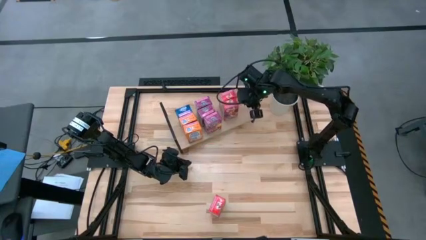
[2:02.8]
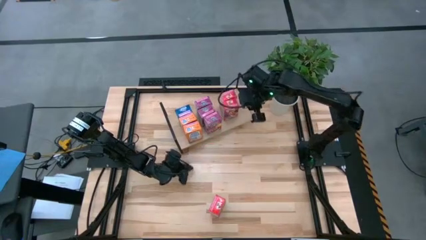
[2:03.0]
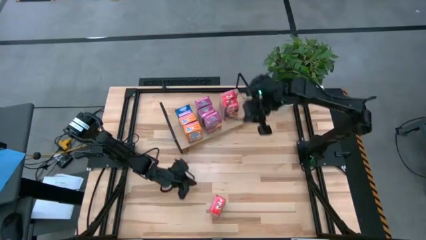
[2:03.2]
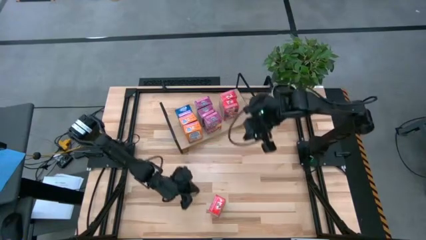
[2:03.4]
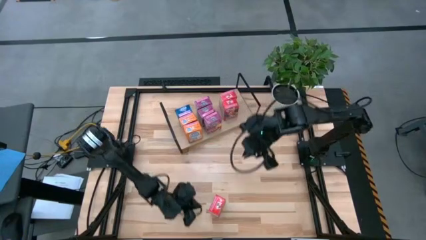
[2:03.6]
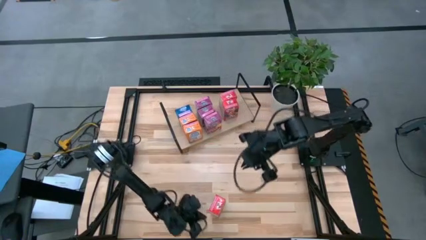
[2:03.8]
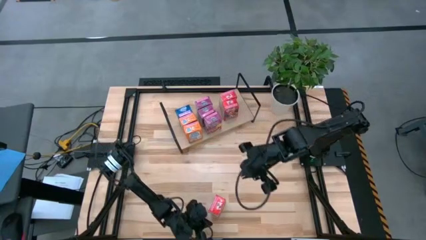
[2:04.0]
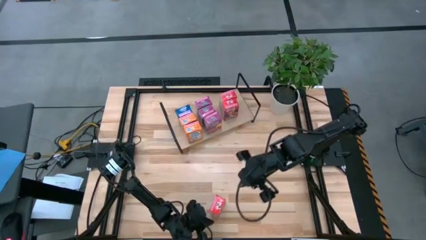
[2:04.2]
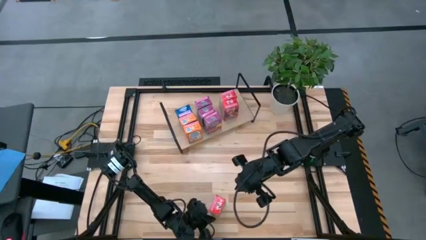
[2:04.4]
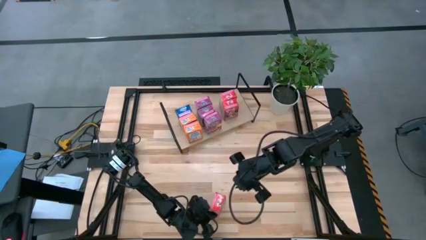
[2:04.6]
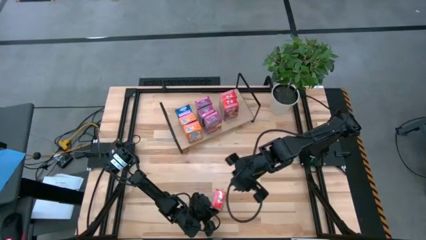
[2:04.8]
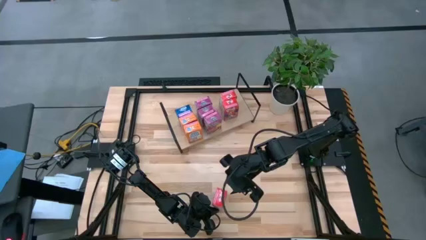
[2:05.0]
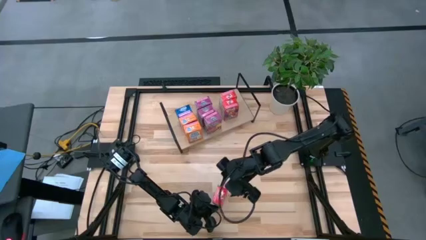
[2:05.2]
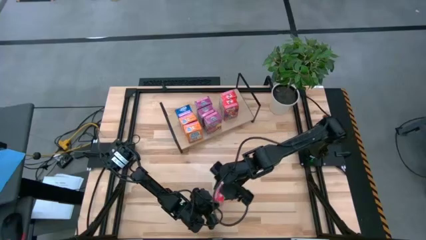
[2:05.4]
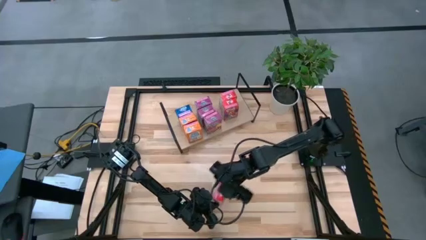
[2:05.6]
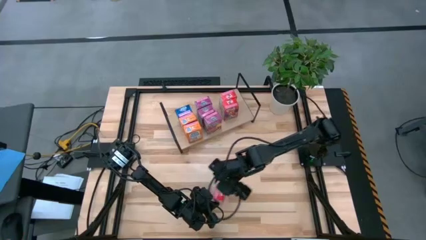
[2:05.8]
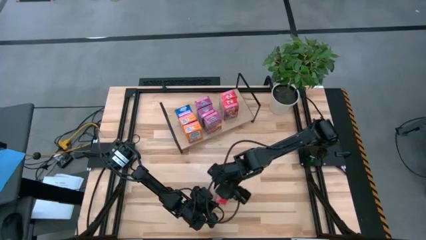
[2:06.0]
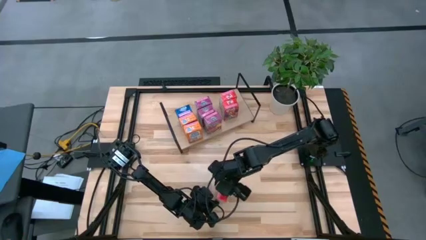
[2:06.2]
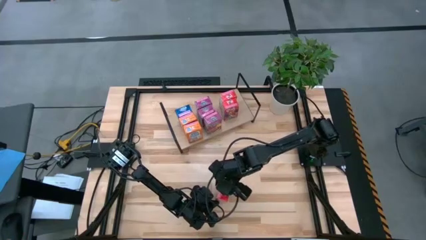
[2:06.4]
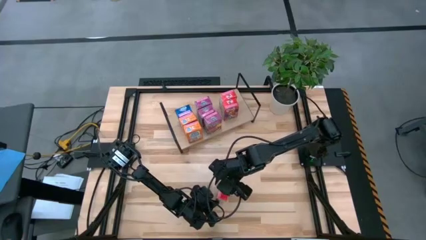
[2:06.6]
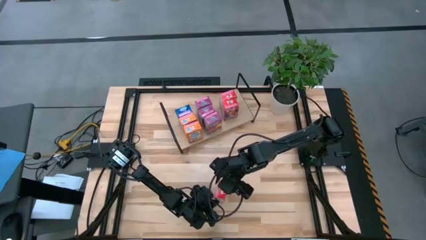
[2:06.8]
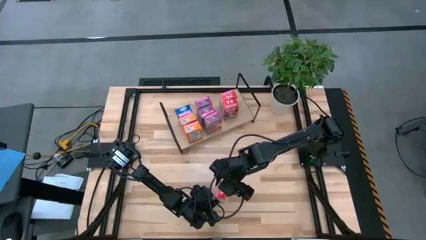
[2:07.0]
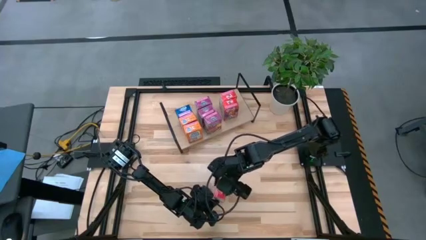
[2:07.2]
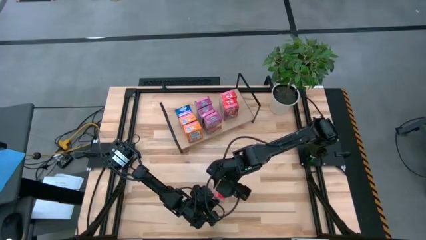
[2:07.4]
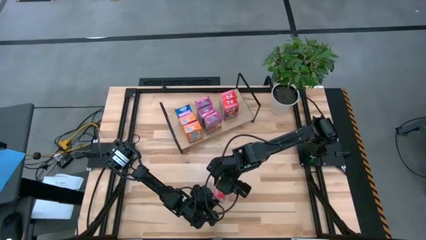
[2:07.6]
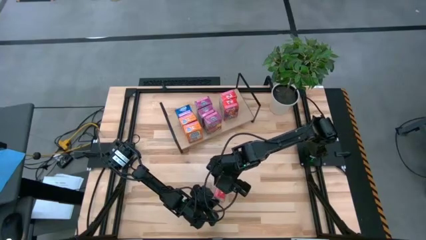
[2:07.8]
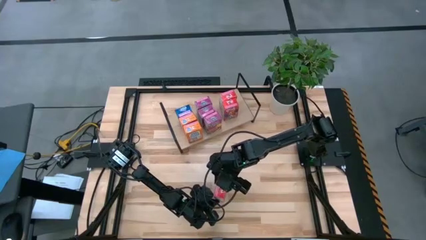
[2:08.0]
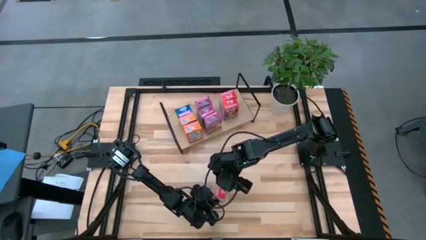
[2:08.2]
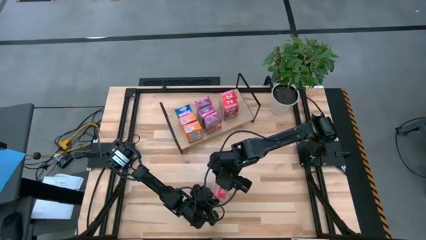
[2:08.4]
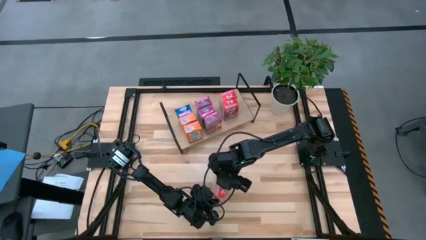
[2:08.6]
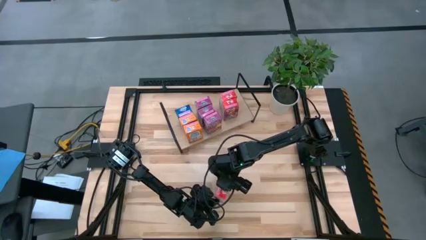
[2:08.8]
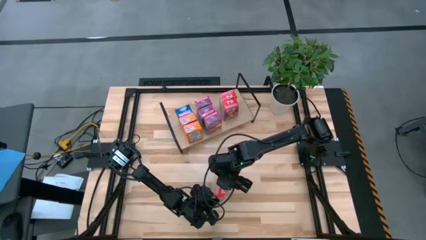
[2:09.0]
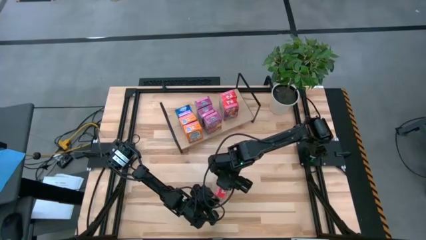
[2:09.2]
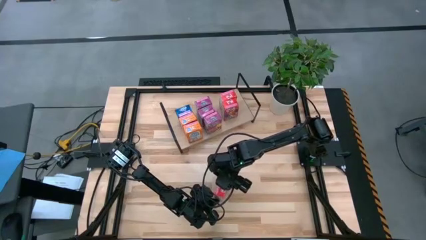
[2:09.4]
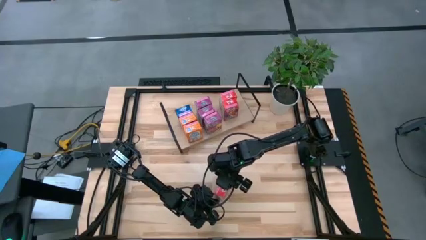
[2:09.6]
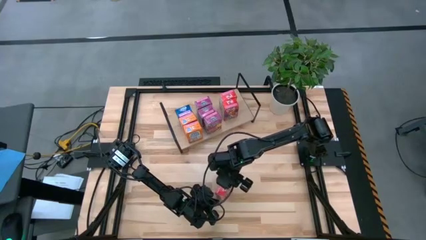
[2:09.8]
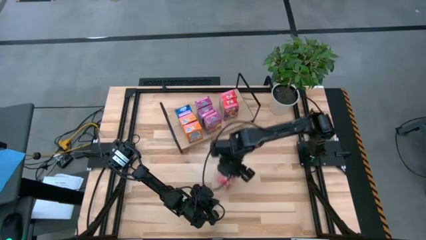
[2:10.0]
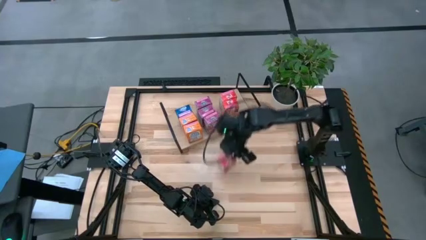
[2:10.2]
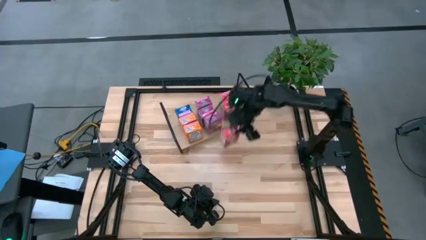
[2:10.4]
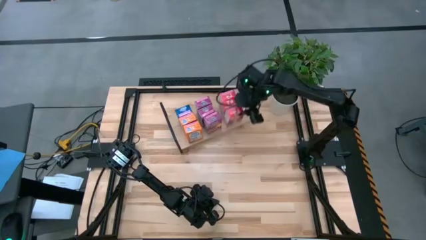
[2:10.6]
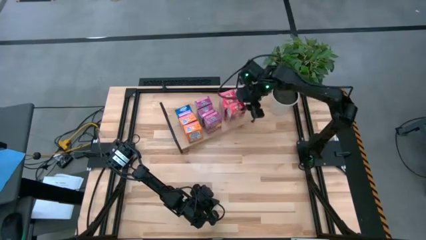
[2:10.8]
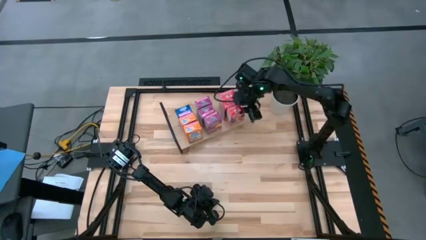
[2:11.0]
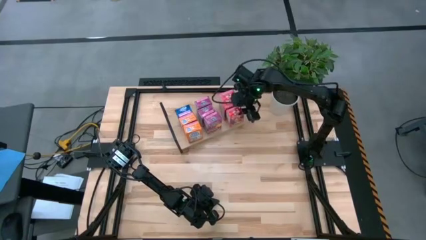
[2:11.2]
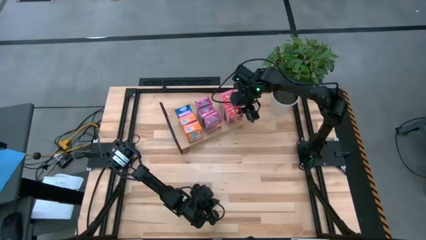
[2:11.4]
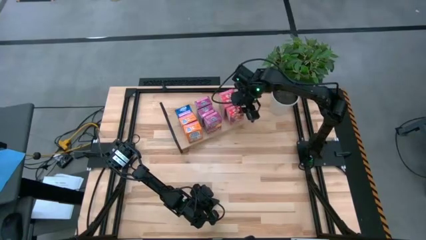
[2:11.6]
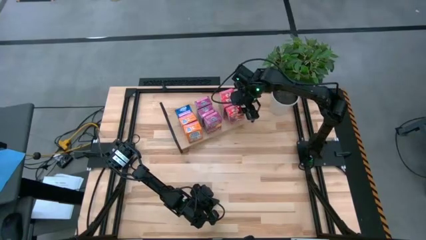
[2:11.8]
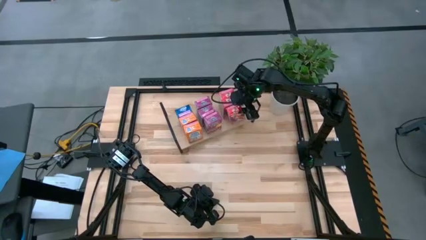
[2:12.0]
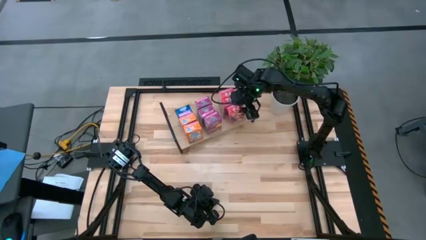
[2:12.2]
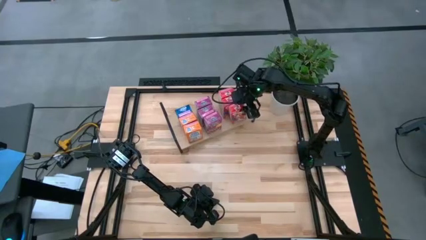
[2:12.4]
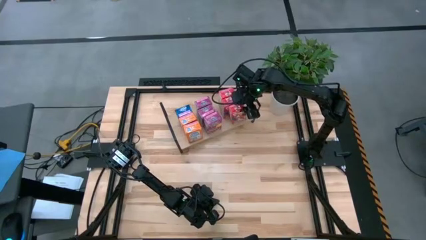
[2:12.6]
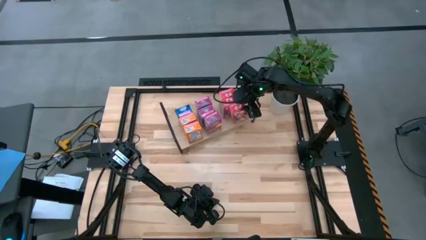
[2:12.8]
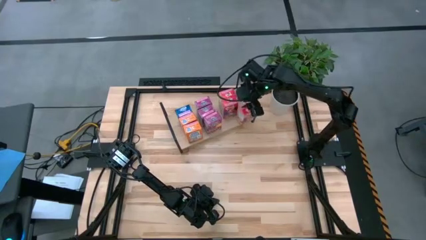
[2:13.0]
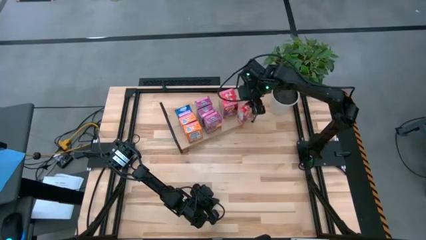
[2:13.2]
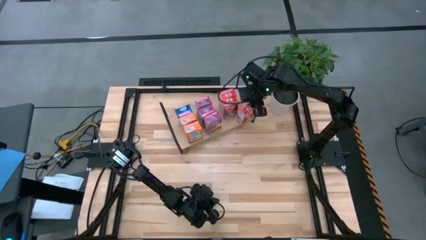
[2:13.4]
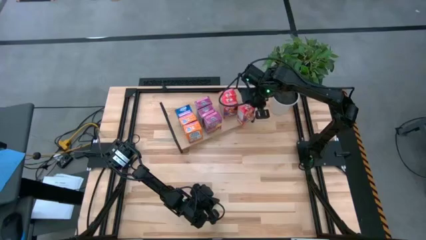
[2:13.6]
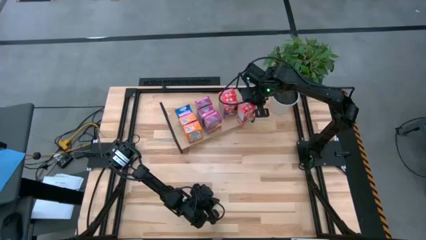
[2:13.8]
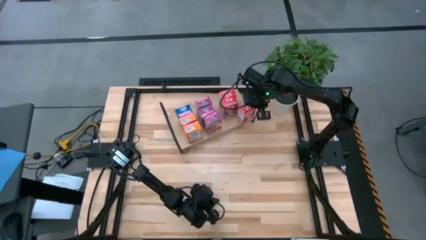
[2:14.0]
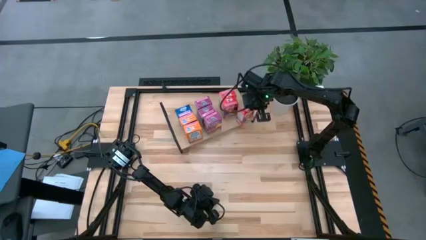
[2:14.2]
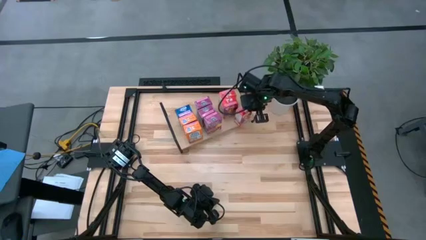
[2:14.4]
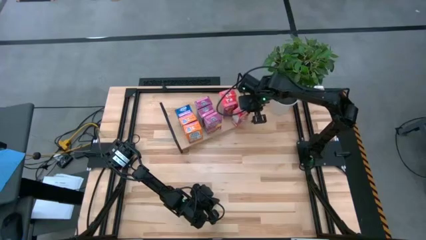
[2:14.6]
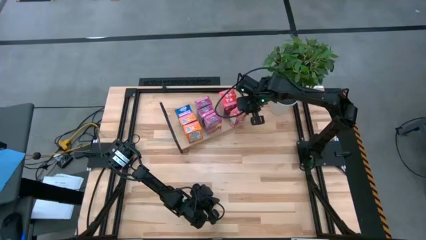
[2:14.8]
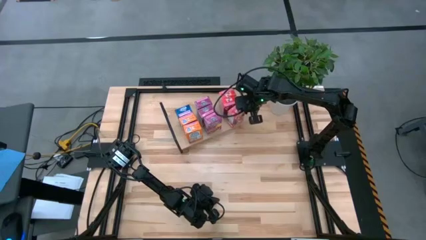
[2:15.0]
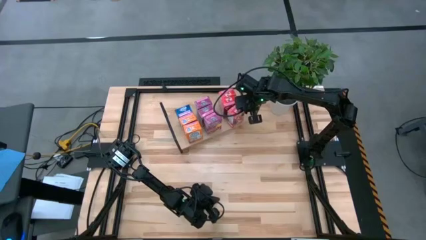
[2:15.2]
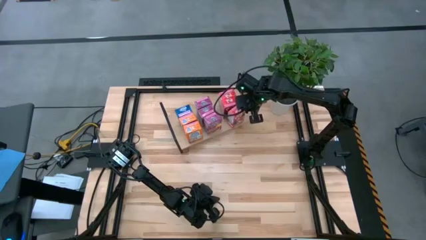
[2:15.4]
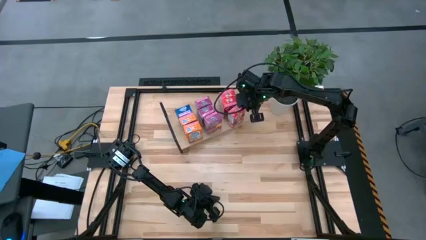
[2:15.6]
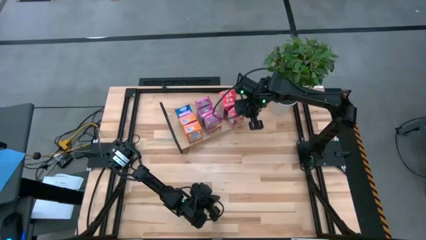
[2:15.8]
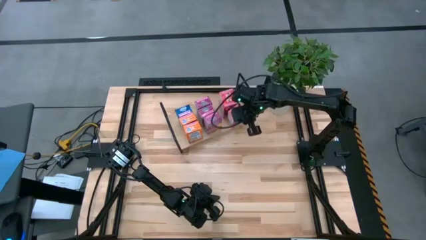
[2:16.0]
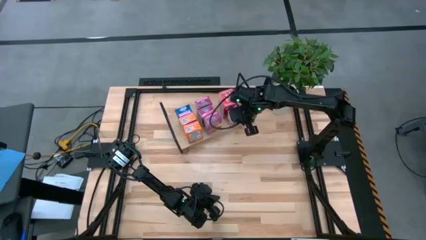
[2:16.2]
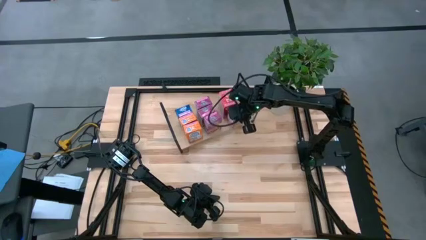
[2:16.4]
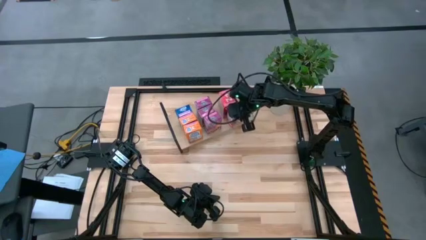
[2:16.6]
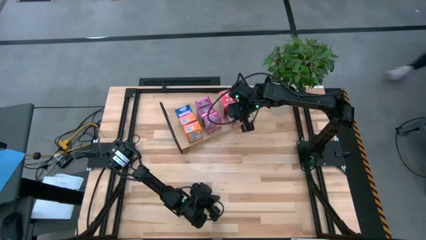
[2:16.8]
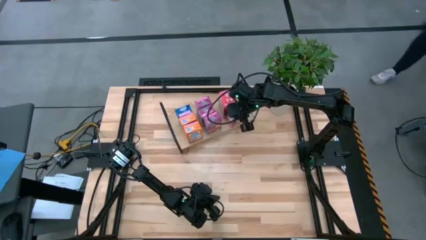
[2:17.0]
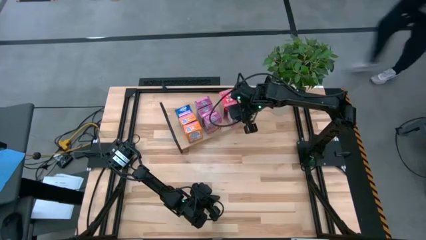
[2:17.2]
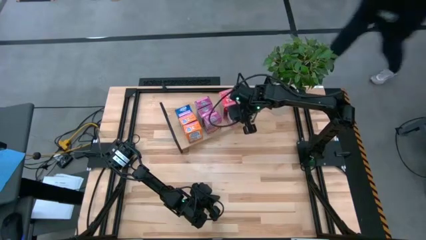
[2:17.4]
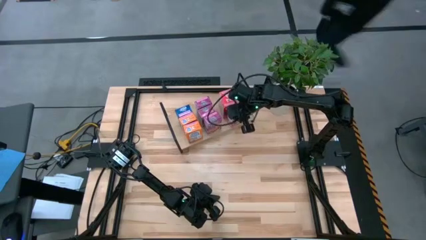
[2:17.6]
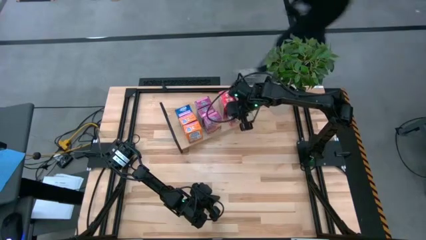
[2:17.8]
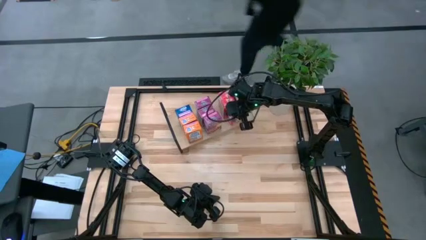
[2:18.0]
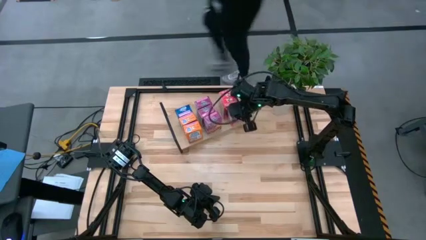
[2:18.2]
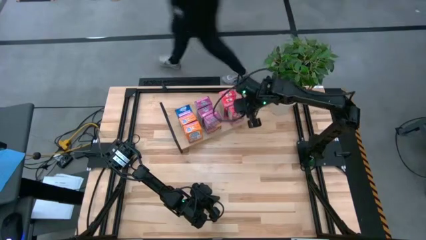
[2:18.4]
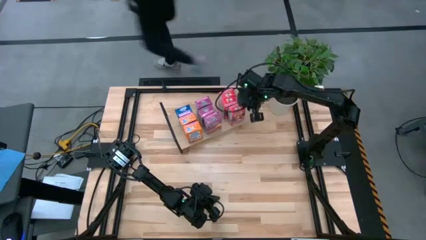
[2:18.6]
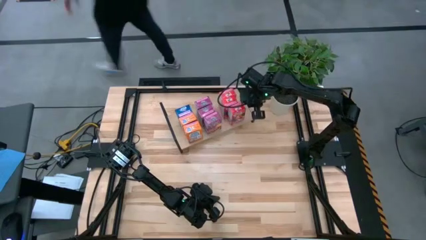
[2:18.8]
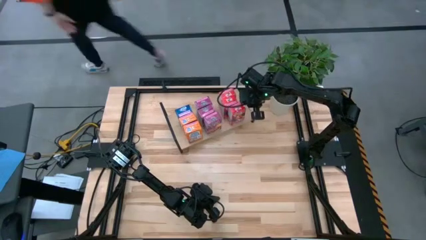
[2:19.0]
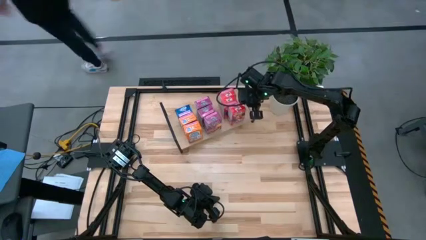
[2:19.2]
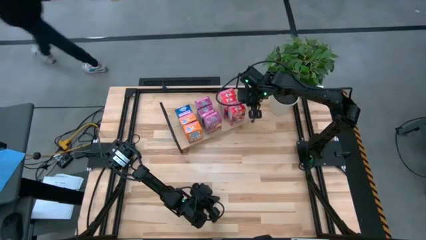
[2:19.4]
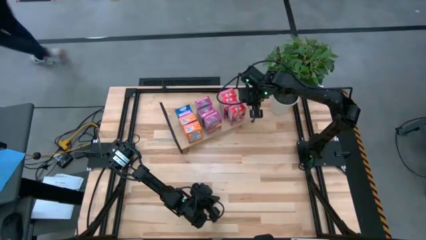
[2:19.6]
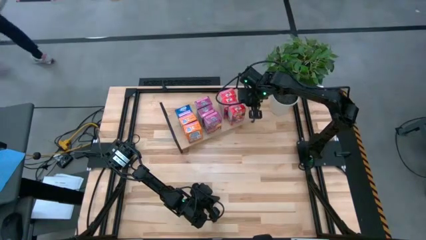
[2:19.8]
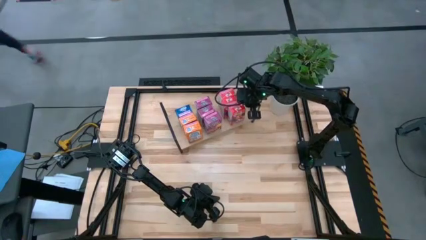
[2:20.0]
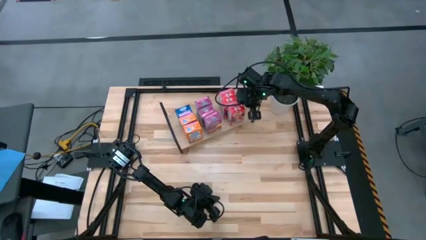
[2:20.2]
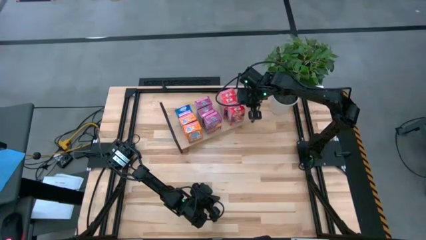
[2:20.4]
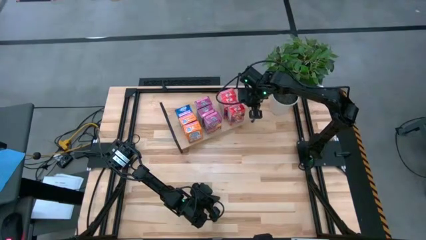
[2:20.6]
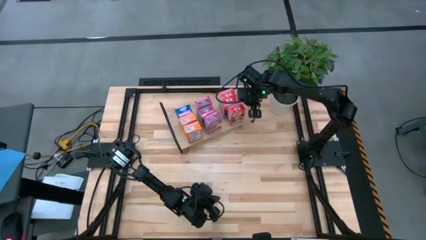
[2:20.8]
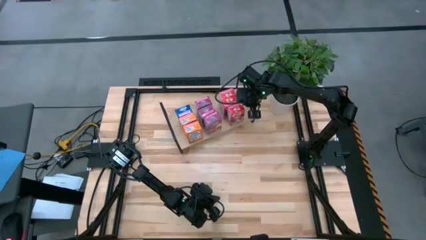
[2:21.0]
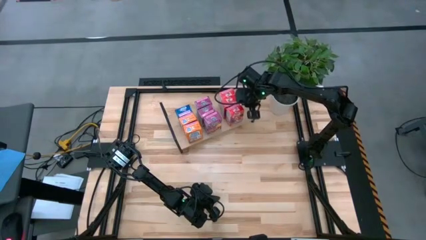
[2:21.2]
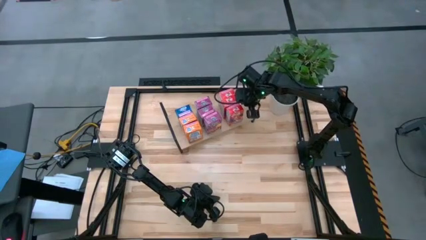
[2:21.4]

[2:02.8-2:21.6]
Task: Stack cereal on shelf
Put the red cereal box on the shelf aligned with the other red cereal box
